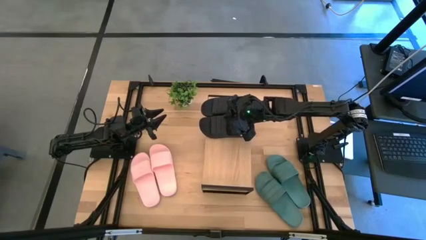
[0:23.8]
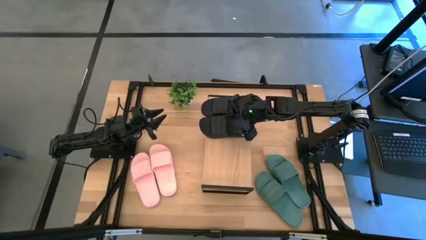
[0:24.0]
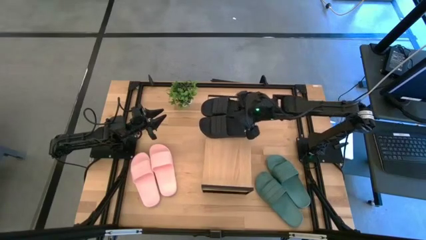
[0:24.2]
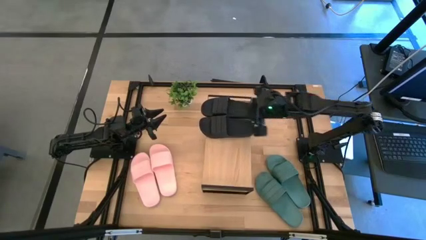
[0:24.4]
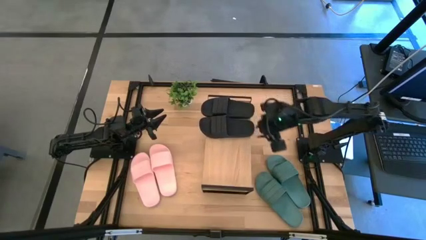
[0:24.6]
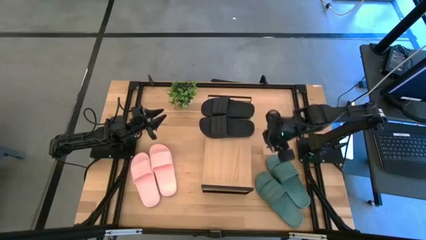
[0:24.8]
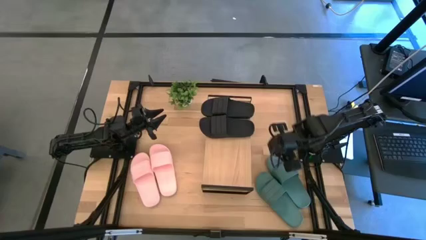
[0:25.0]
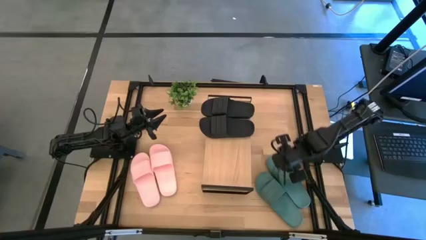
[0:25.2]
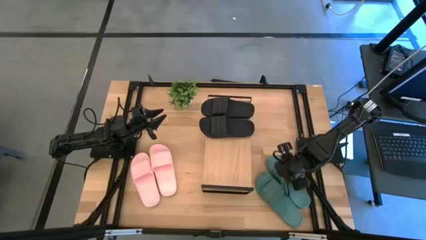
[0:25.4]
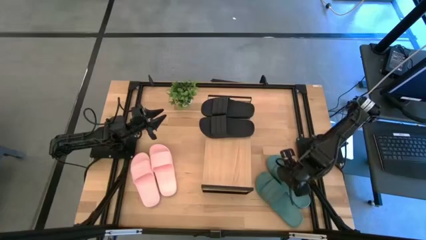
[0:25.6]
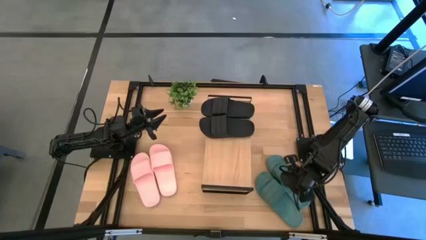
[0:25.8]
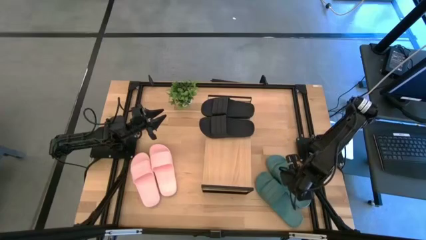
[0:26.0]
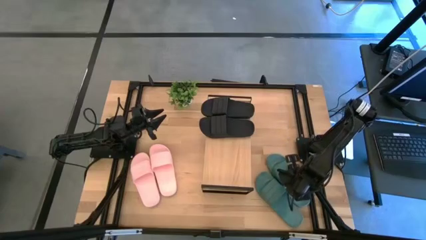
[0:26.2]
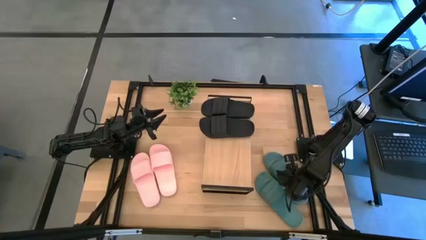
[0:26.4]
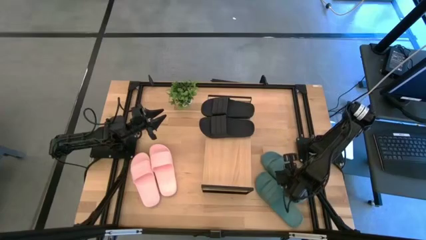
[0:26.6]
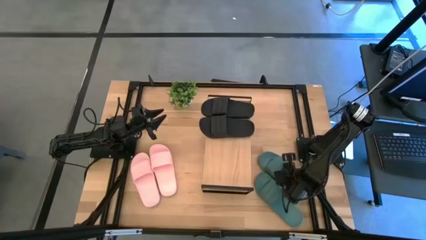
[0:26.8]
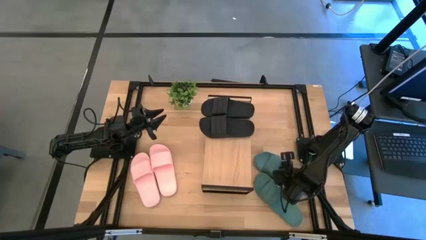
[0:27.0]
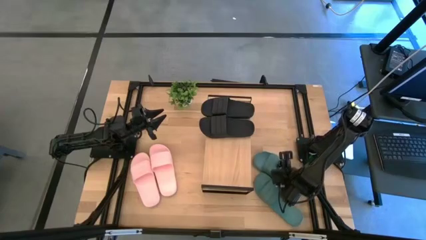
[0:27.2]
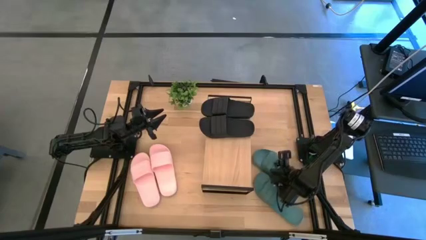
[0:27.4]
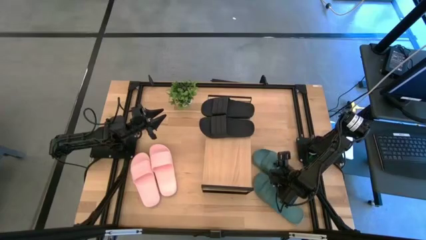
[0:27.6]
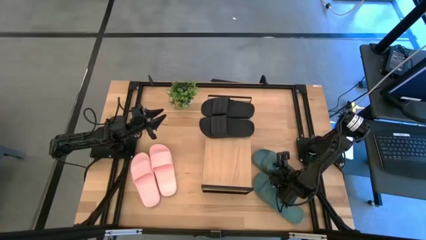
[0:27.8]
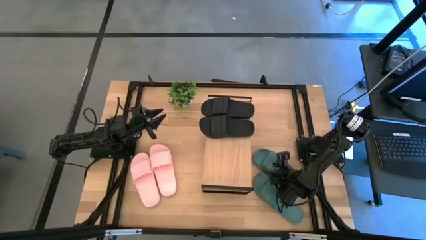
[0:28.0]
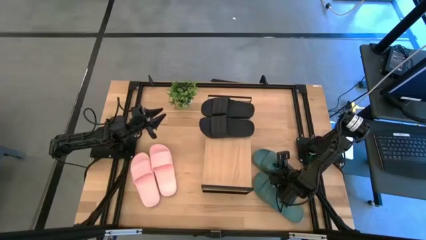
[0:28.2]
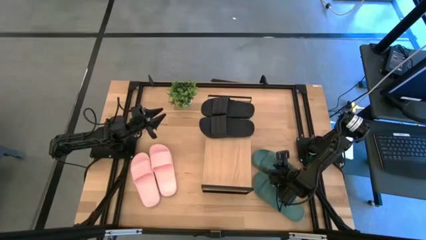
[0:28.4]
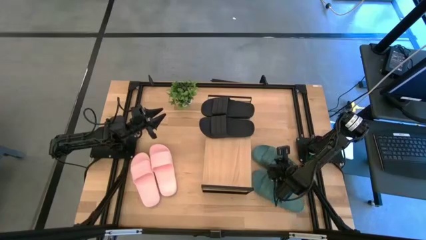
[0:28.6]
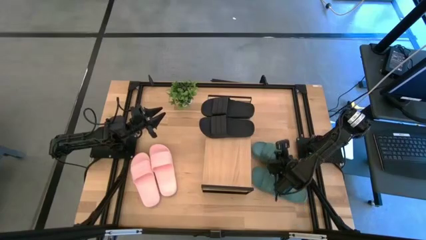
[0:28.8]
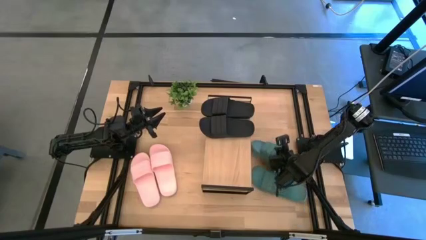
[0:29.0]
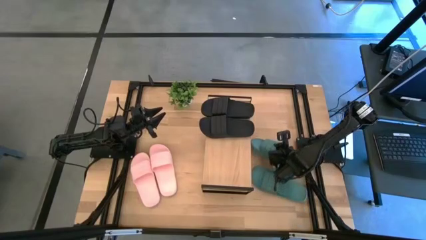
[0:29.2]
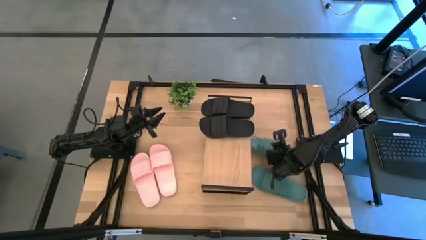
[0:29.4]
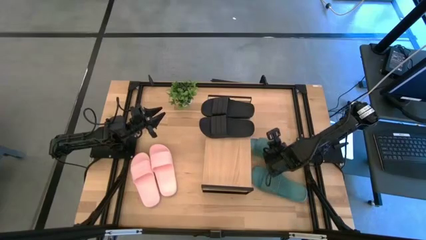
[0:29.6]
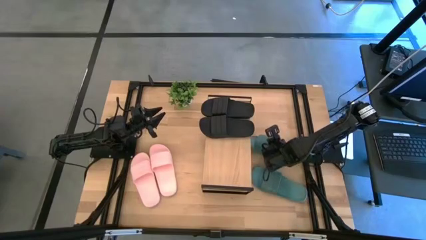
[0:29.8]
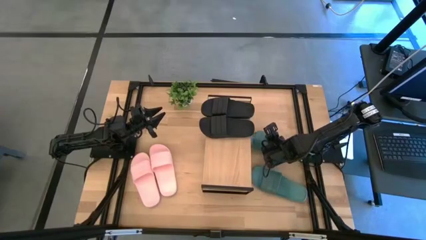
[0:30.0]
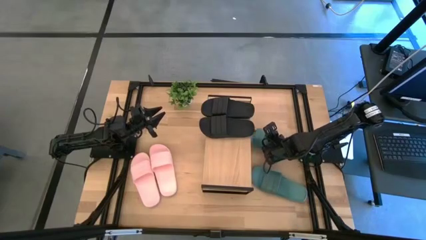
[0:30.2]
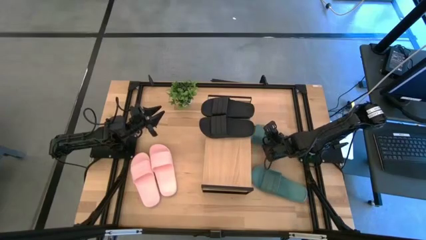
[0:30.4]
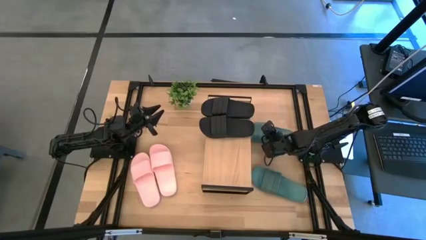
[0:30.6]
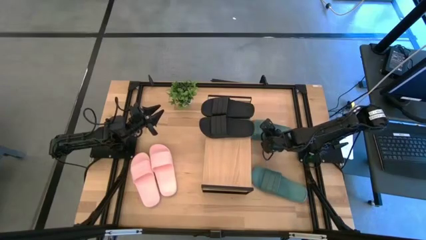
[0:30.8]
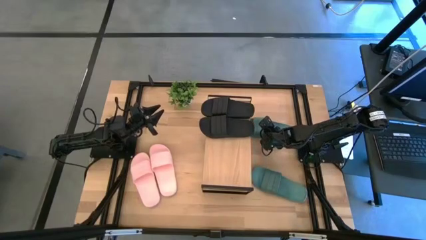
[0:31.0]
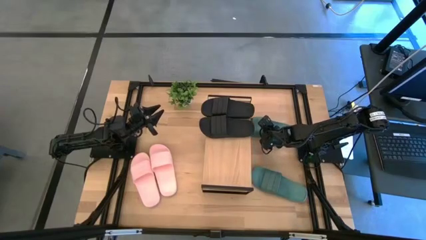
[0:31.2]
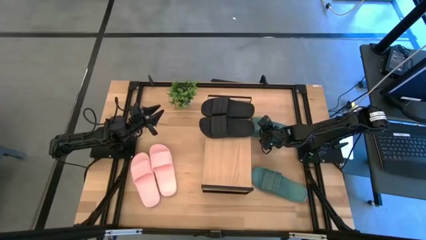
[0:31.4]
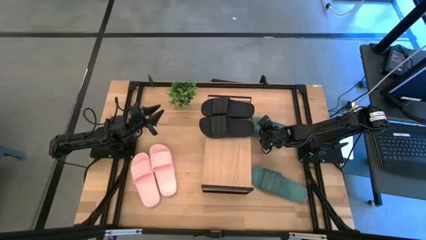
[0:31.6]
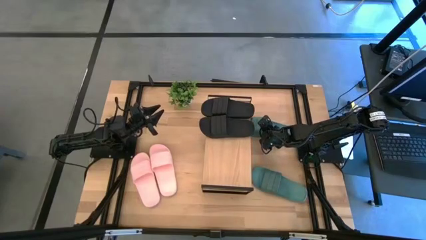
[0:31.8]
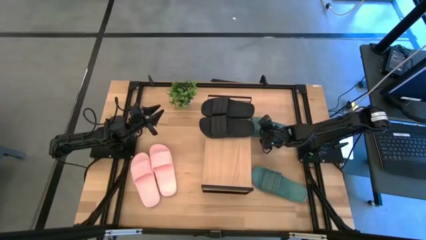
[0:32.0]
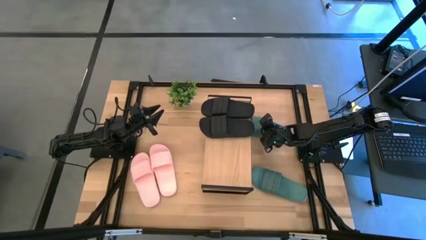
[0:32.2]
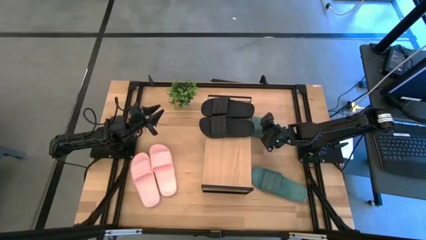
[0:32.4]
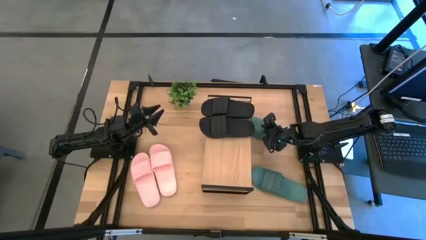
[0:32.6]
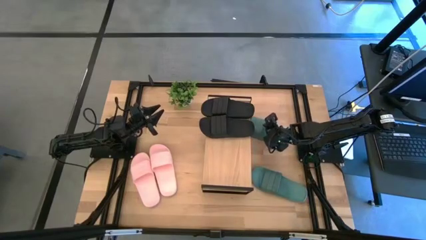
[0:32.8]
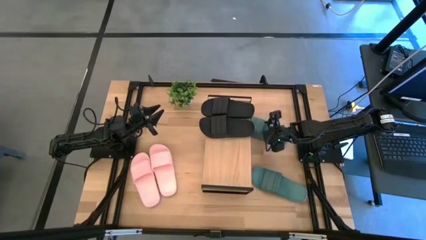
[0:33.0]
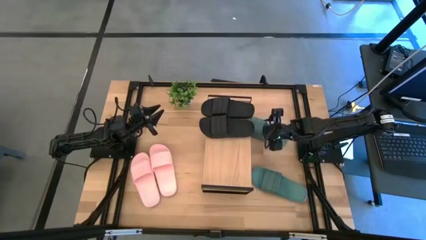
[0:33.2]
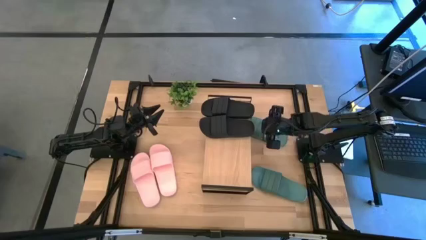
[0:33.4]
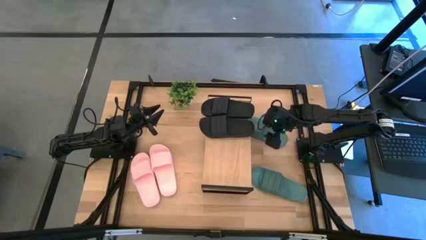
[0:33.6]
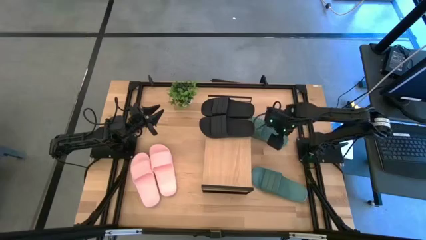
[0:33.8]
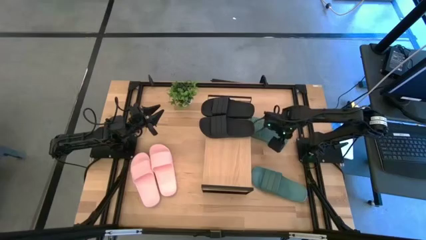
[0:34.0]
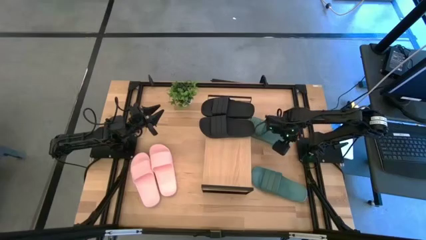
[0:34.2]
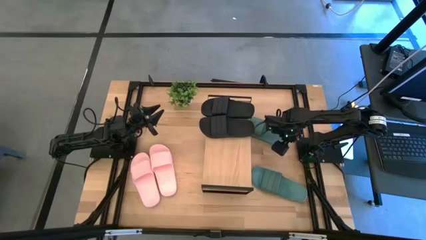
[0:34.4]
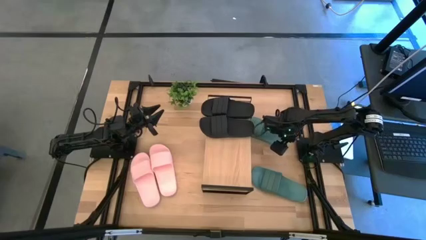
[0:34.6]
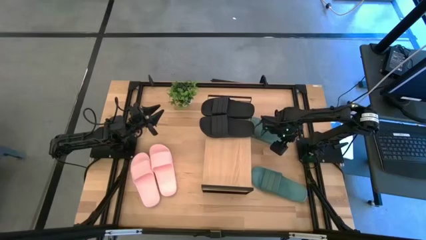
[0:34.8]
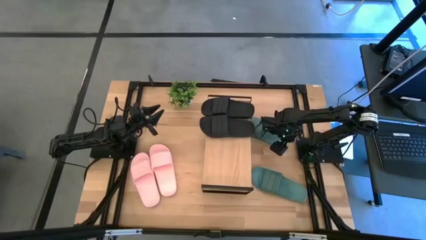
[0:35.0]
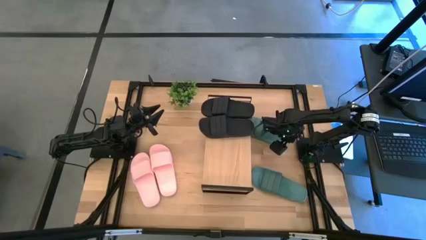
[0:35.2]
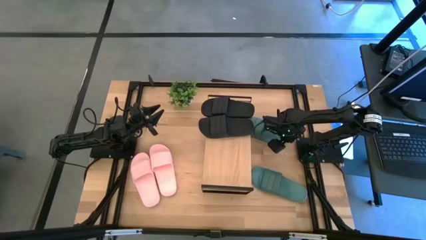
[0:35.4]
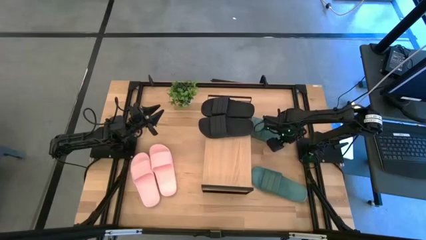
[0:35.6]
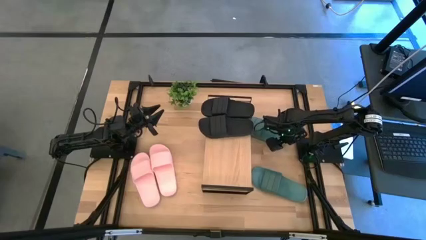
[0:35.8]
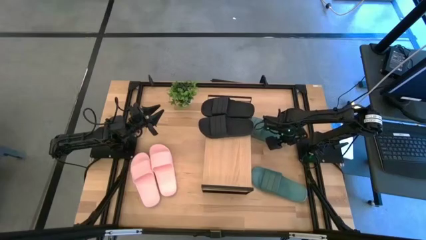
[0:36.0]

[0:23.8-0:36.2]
Task: Pick and place slides into the shelf
Put the right green slide under the shelf

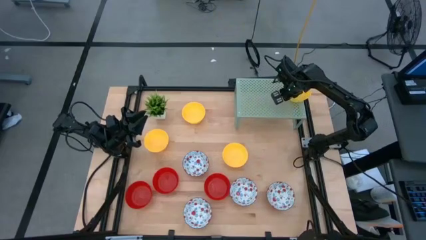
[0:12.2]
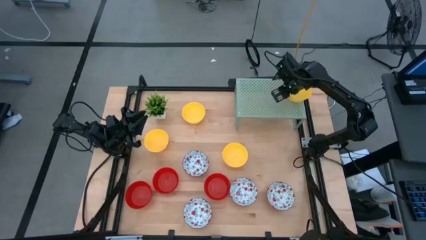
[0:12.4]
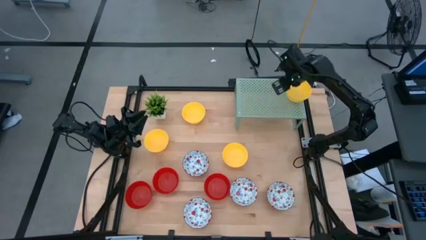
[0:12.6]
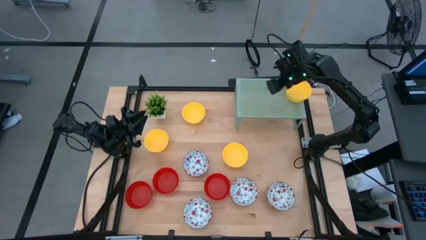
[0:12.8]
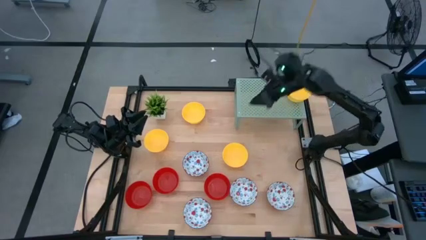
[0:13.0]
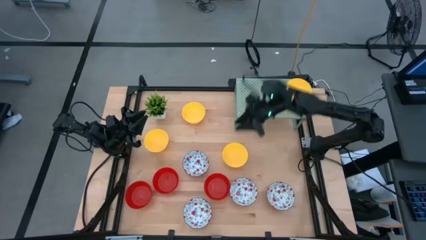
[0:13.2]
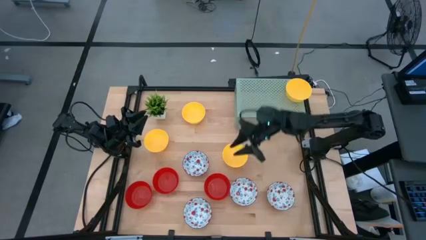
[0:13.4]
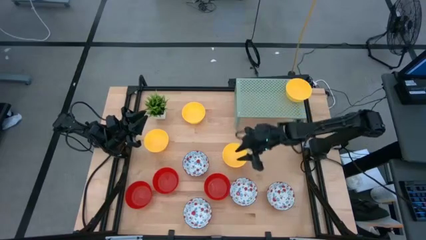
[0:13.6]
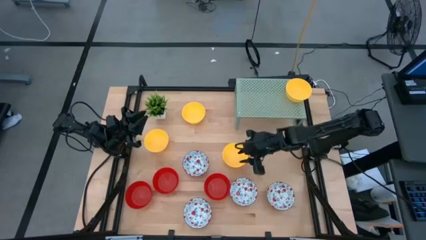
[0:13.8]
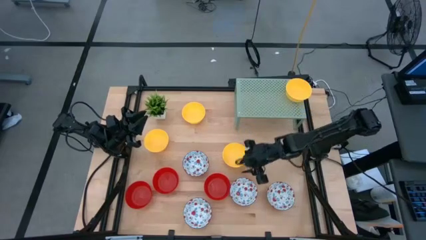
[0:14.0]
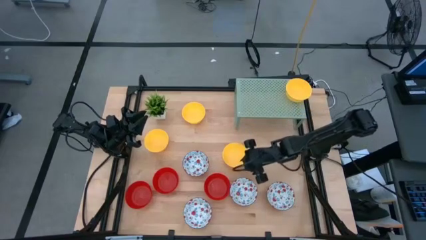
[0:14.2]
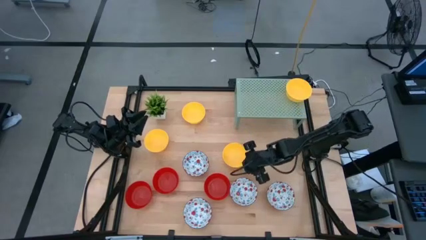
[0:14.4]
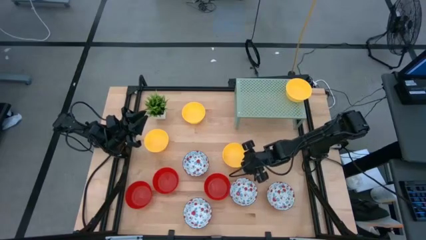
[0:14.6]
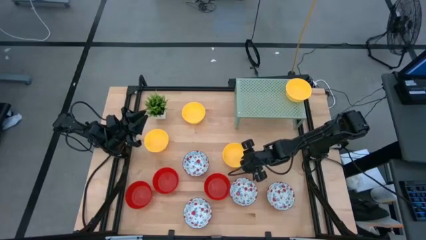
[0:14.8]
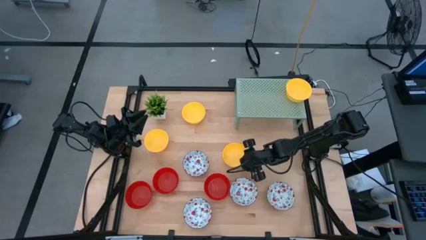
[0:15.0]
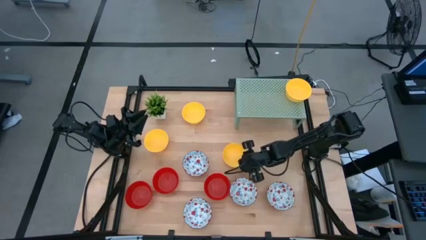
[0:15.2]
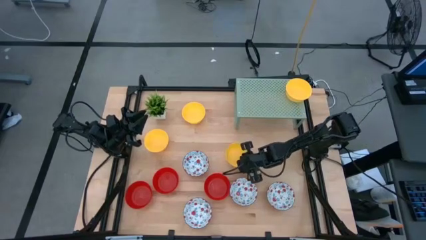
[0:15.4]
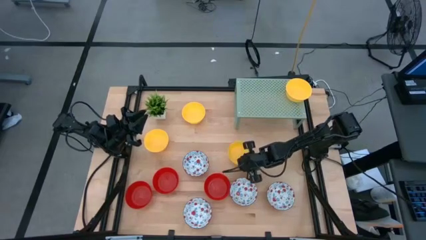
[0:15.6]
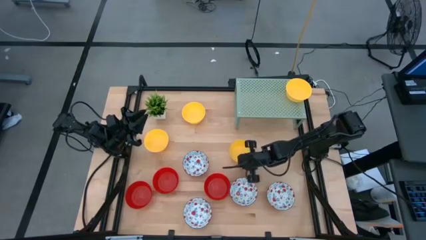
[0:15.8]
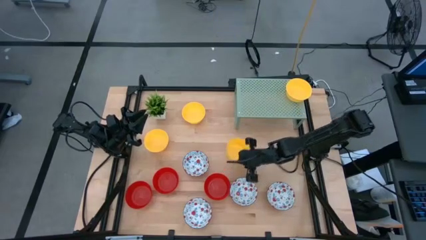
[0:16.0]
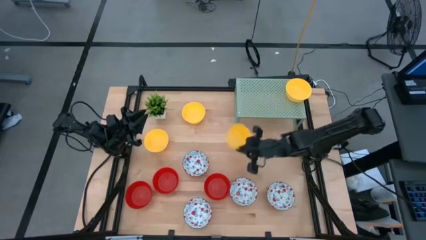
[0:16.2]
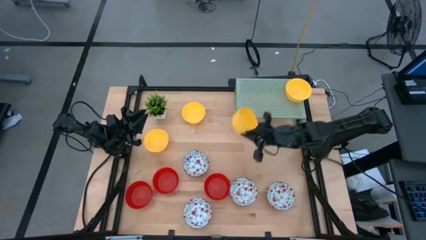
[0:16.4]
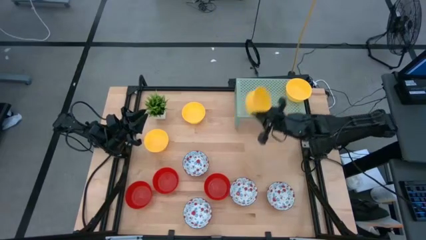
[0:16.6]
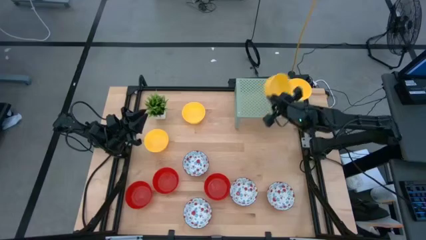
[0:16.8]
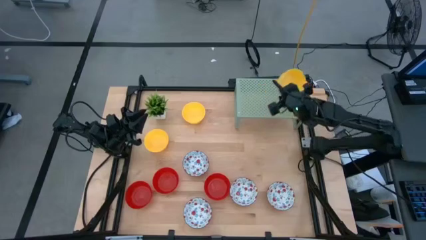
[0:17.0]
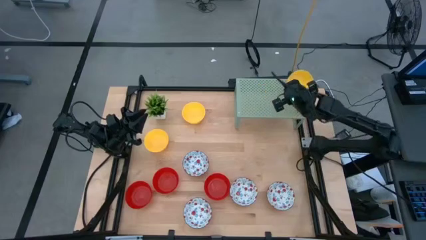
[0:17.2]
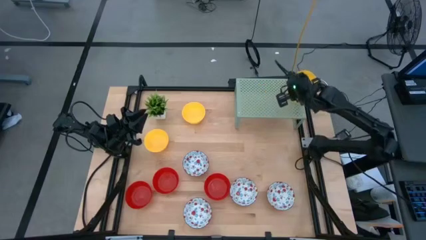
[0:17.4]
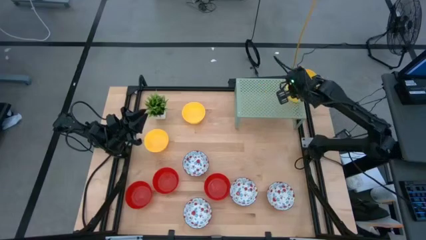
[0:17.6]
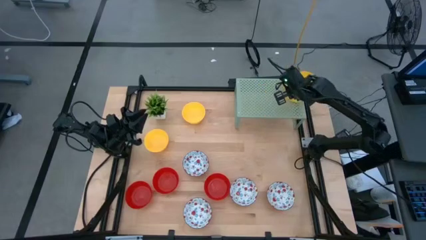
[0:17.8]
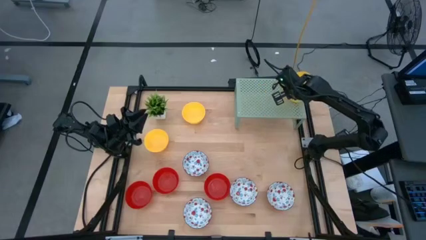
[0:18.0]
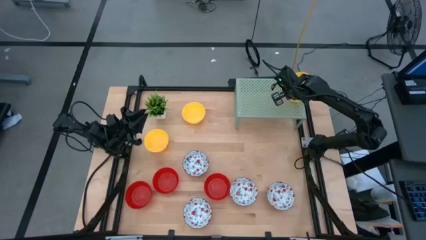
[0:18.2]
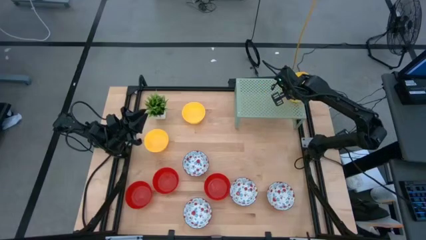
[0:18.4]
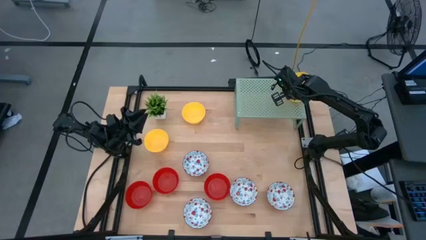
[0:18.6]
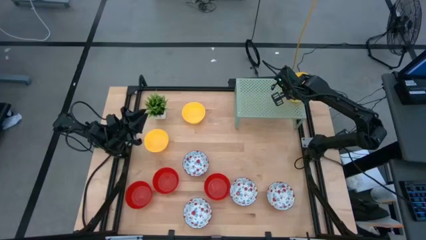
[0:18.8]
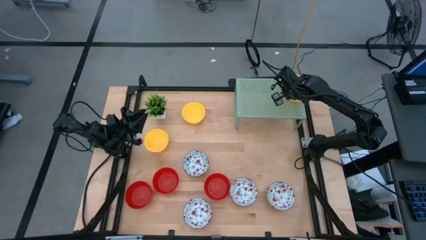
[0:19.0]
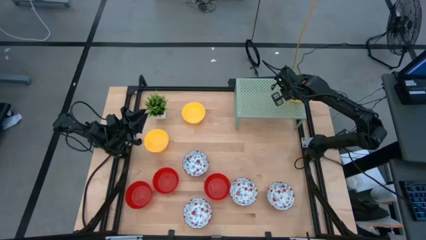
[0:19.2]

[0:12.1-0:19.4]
Task: Pick & Place Mini bowls
Stack the yellow bowl on the yellow bowl on the shelf
